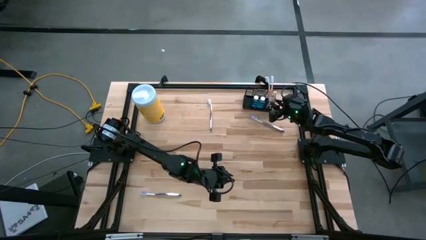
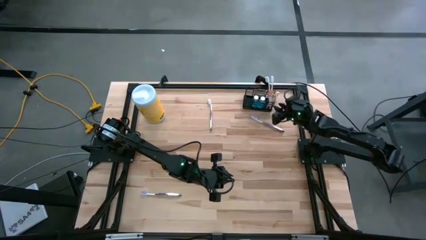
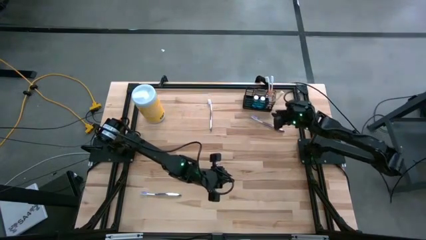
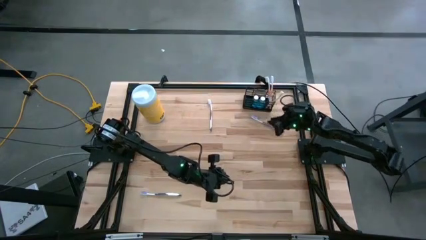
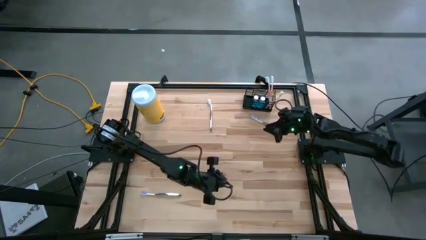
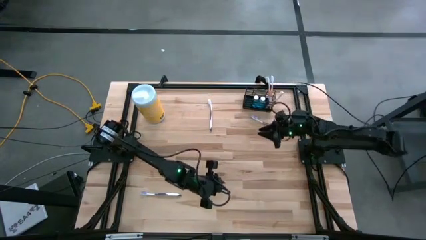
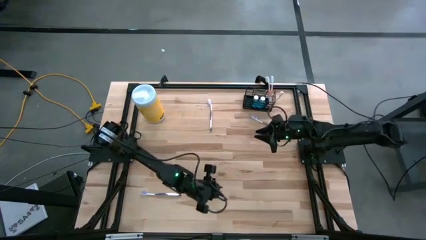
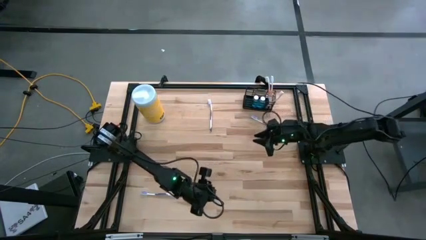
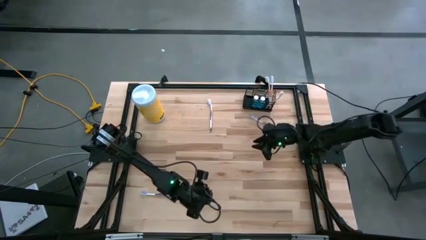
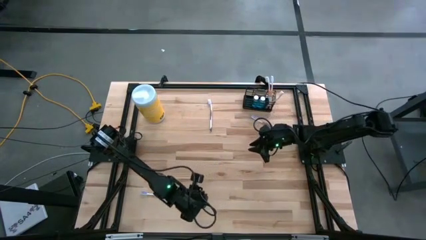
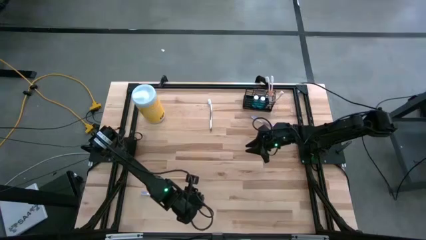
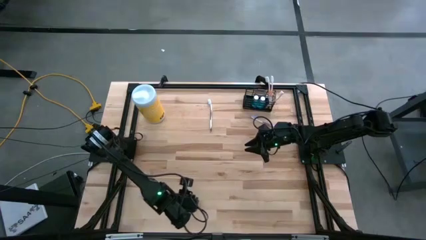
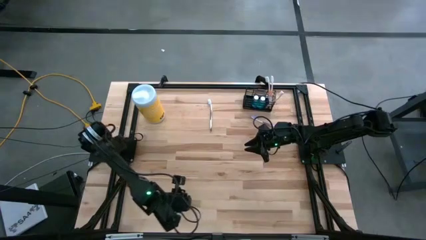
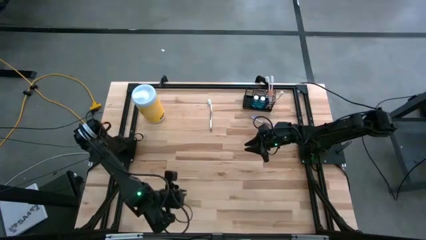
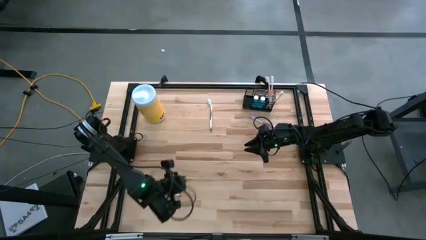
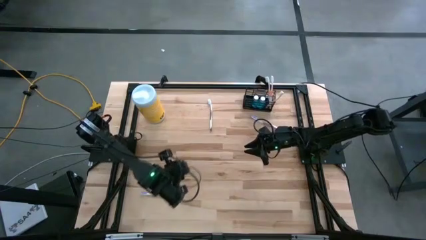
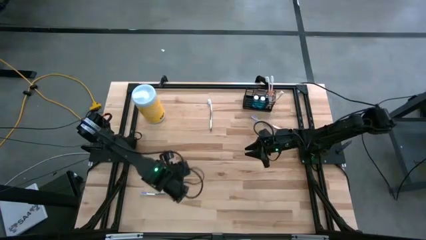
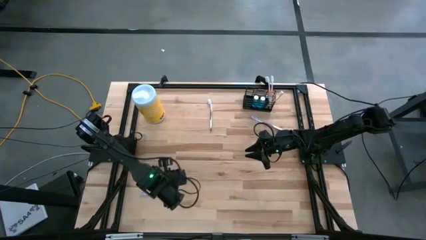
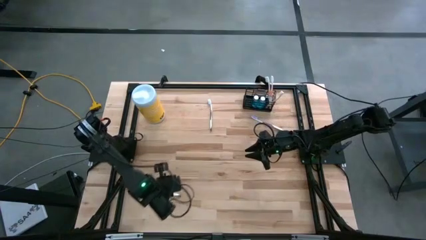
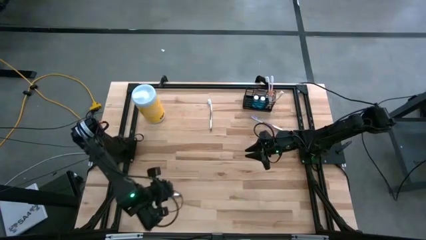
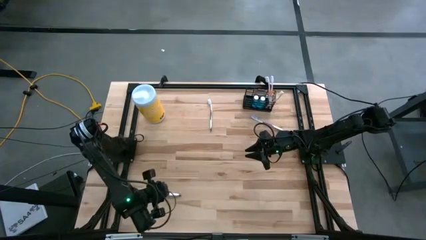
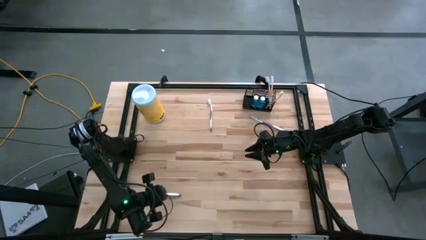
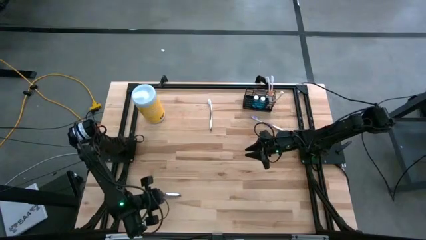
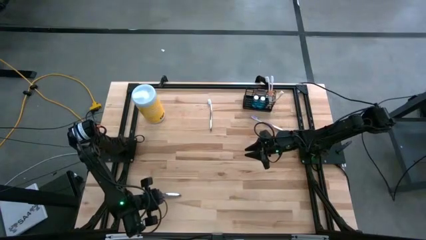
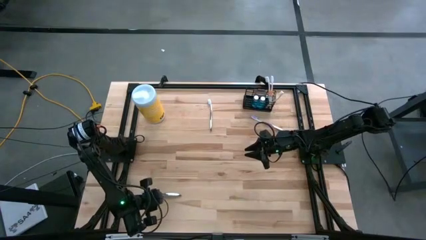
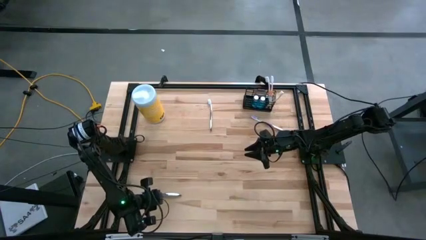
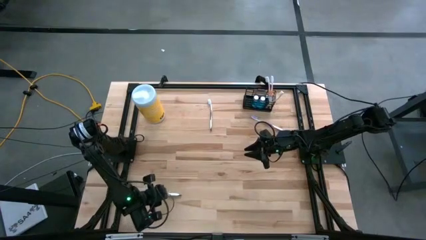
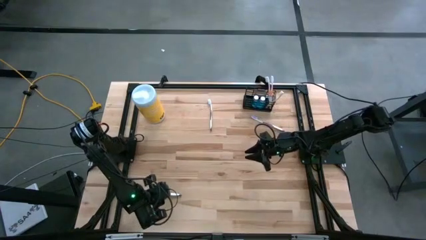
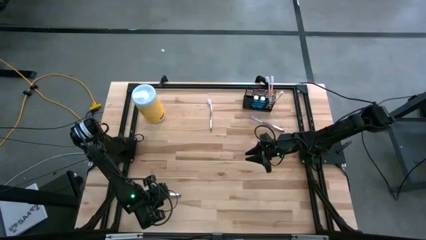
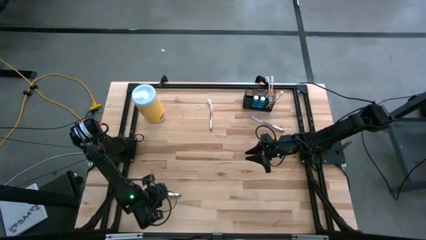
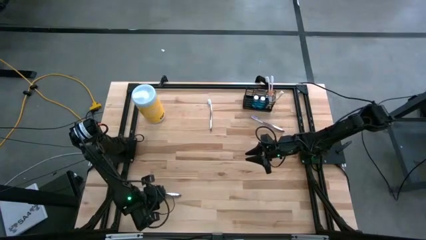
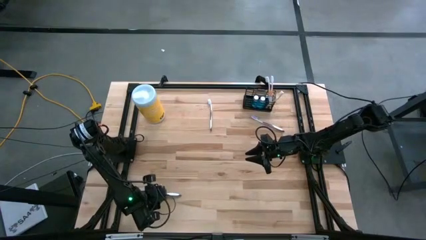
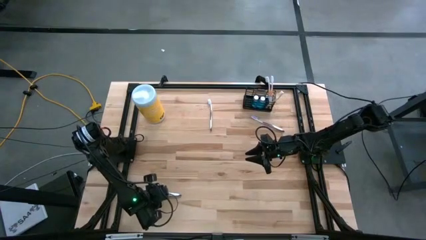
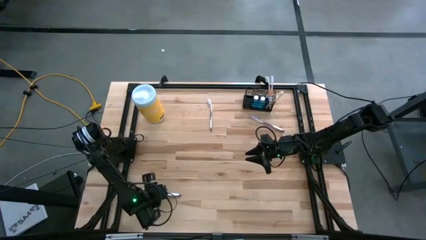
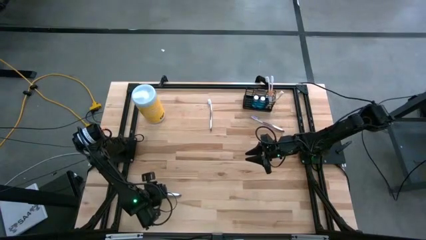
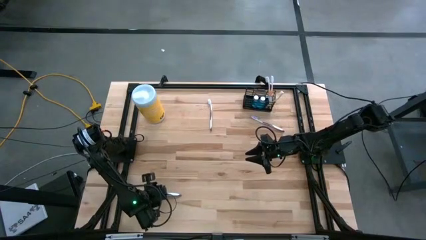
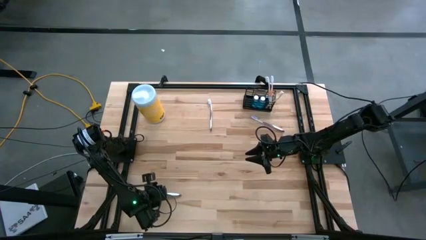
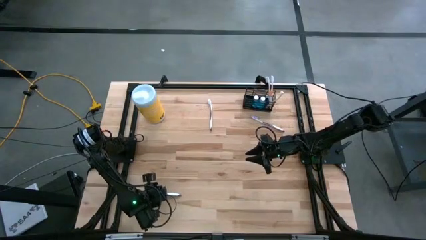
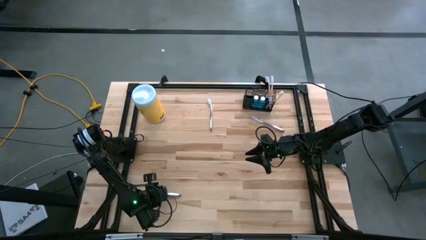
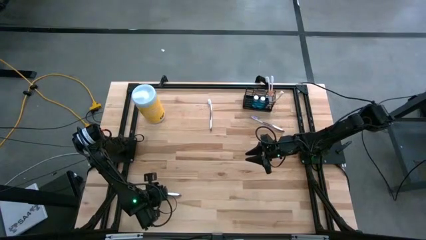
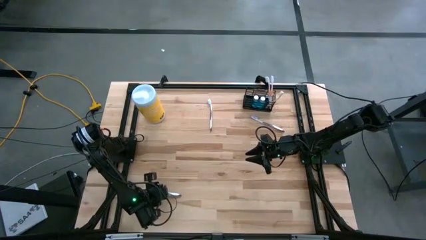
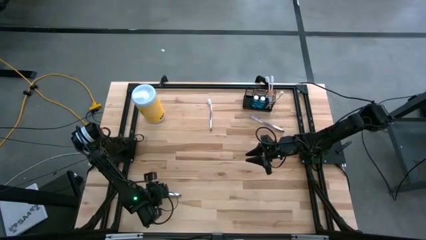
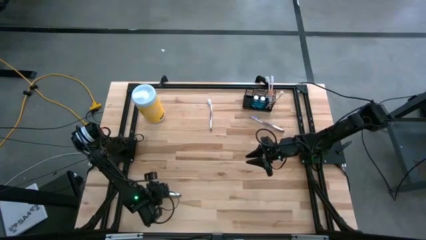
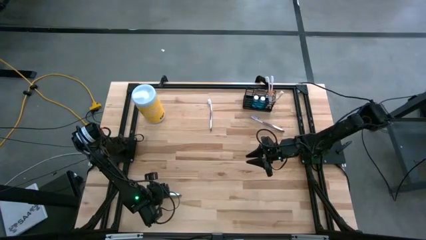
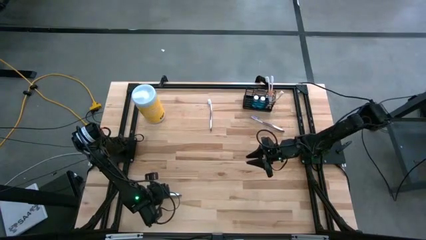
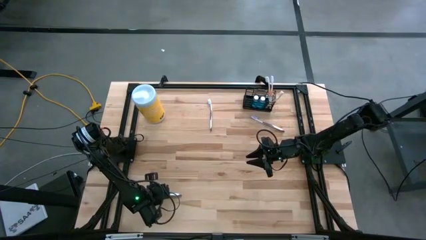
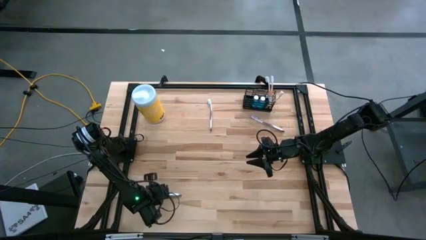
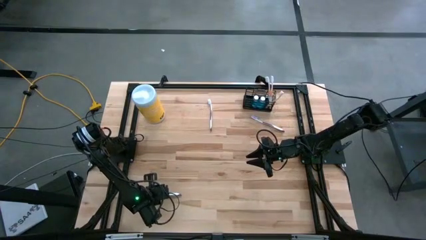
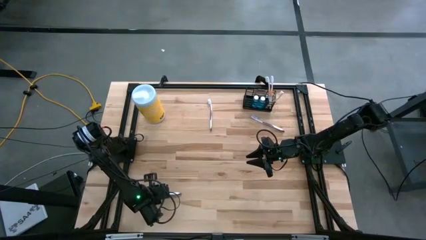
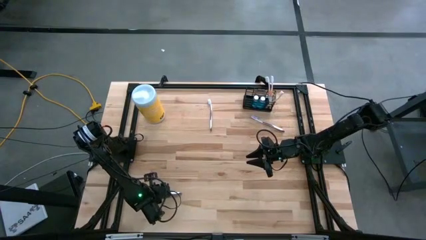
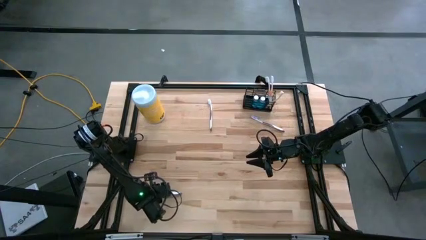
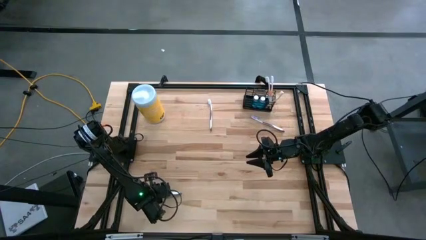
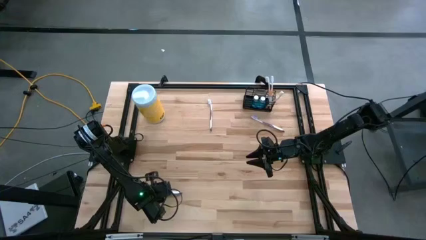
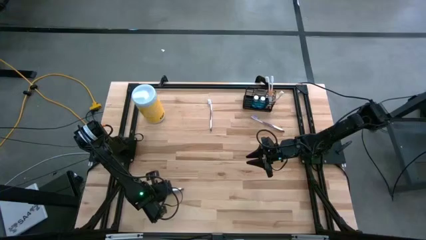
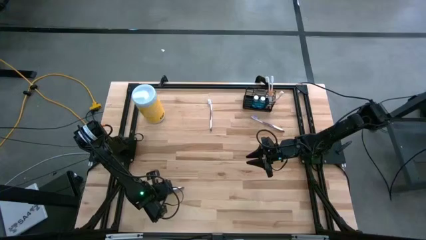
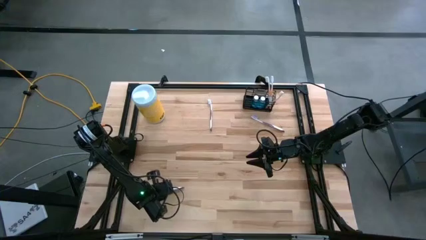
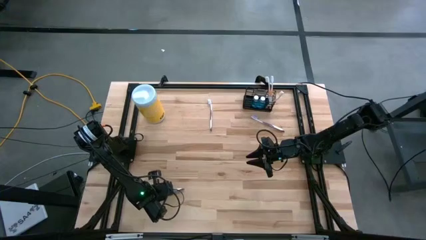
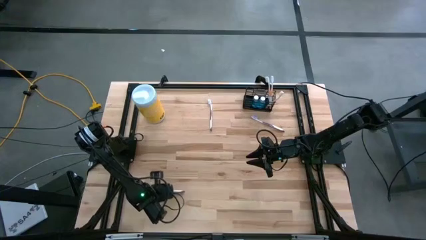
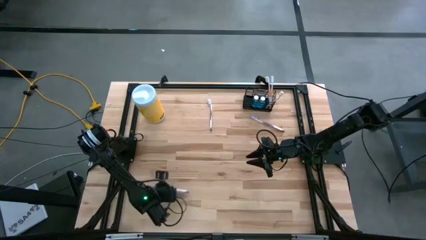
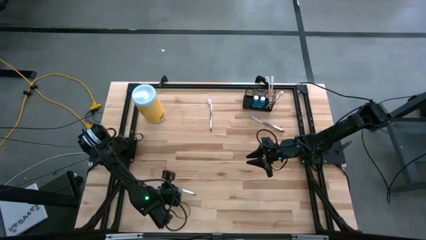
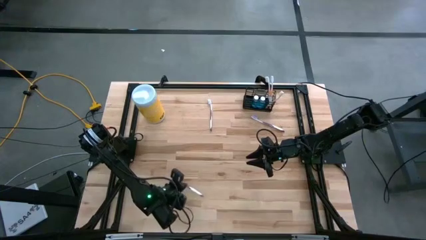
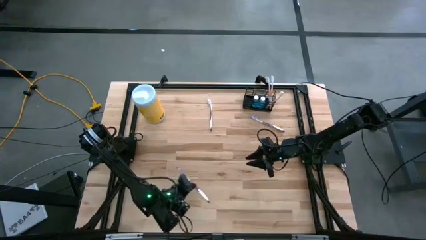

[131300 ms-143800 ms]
Task: Pick & Place toothbrushing station
Put the bottom violet toothbrush into the left section of the black wire organizer

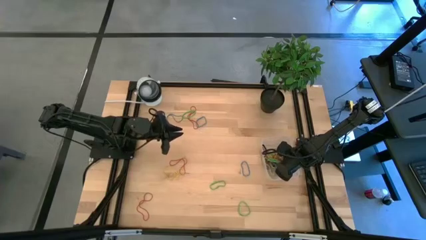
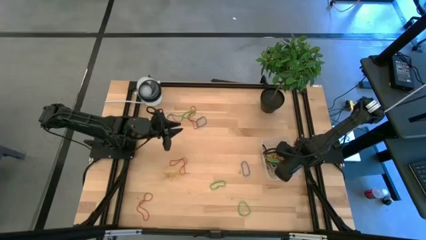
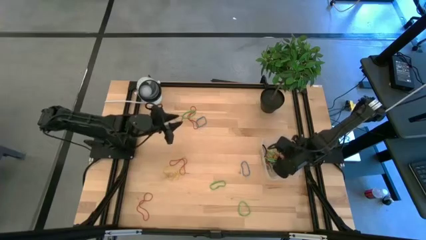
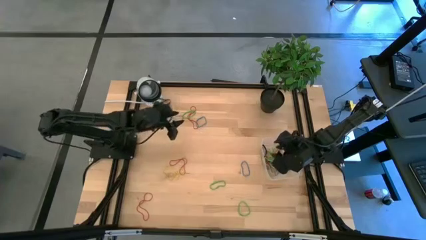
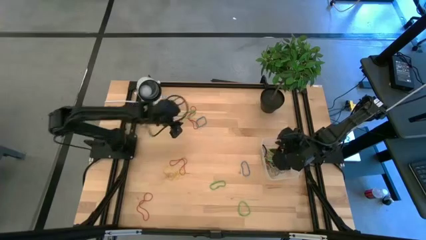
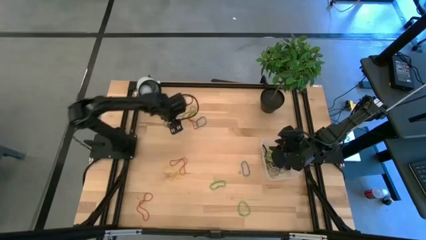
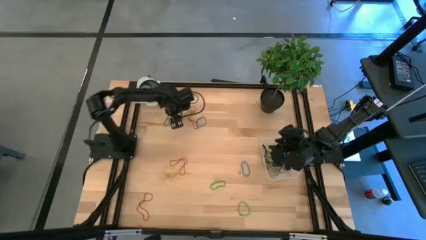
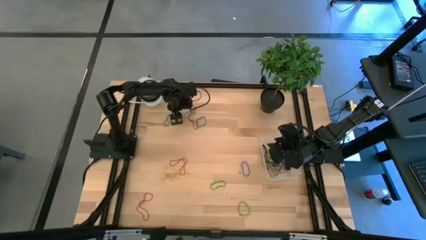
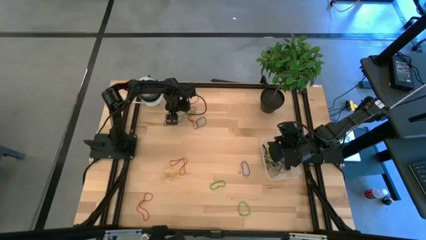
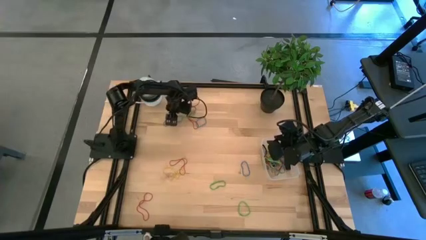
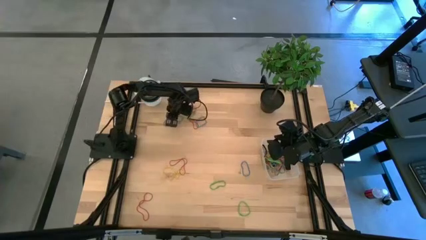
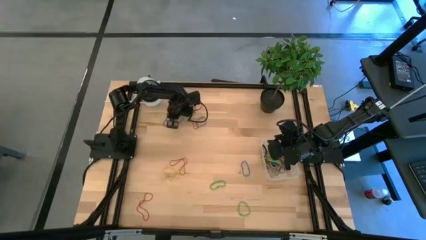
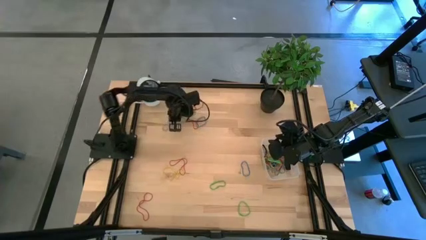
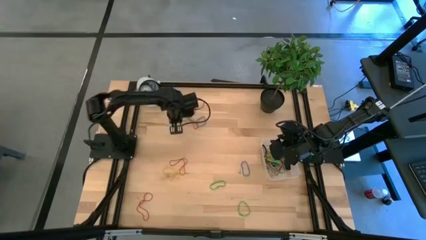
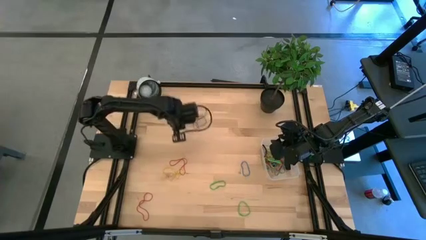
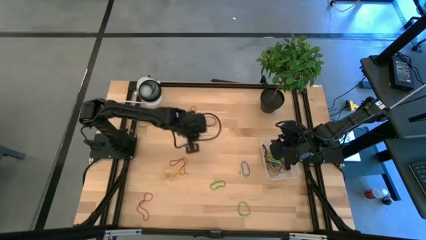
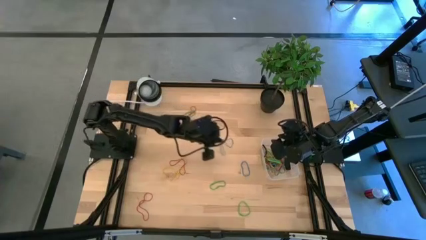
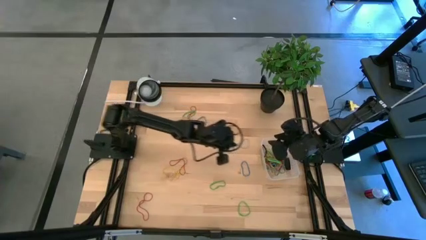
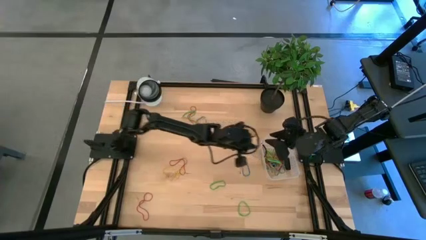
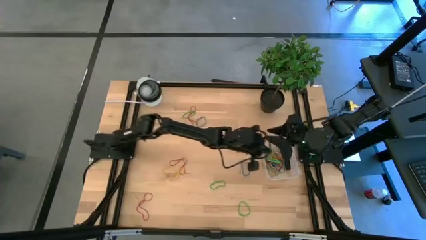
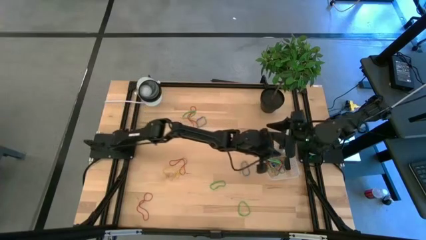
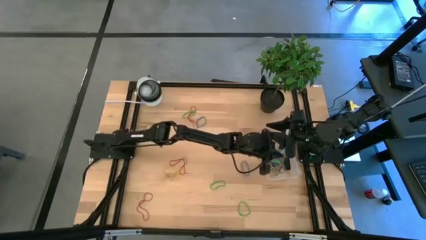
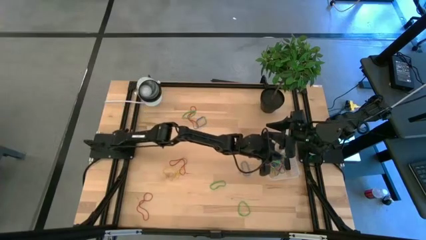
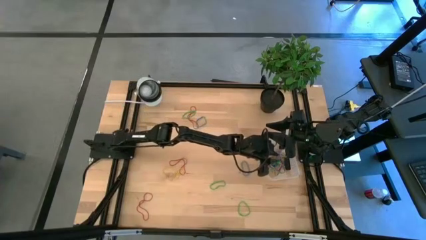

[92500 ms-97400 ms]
Task: Pick and place rubber bands into bin
Put the blue rubber band into the transparent bin
